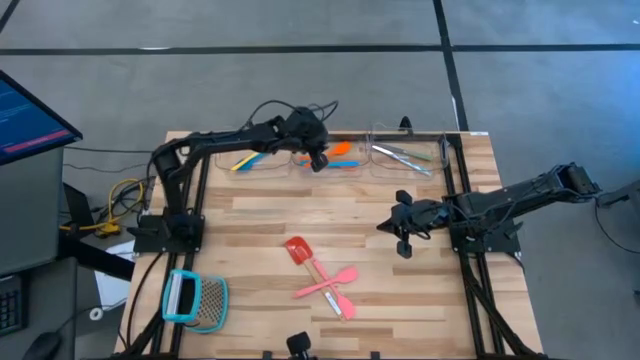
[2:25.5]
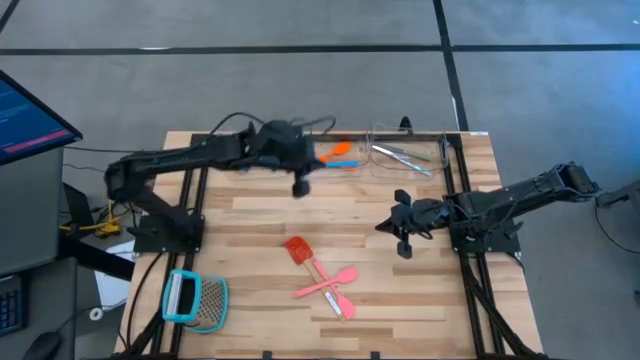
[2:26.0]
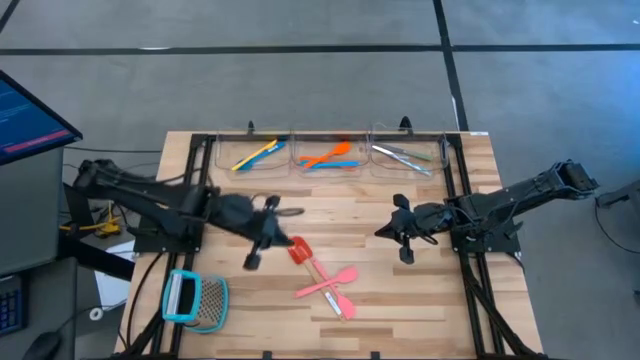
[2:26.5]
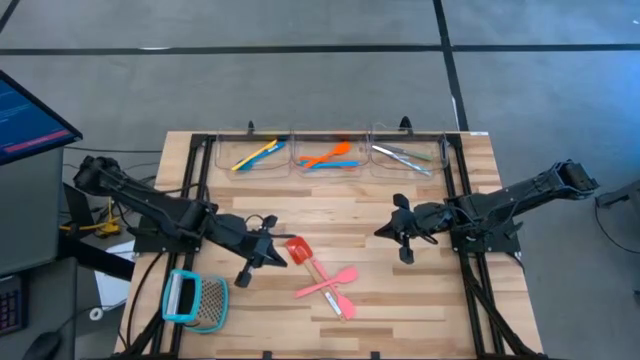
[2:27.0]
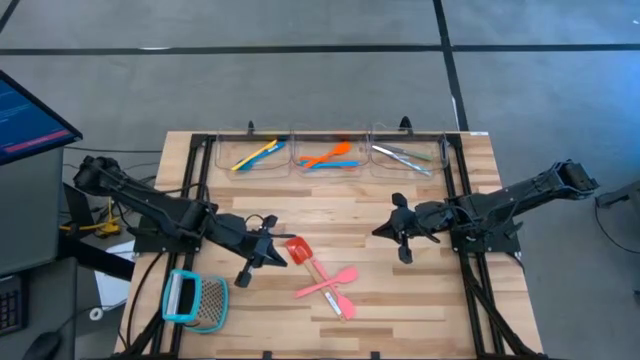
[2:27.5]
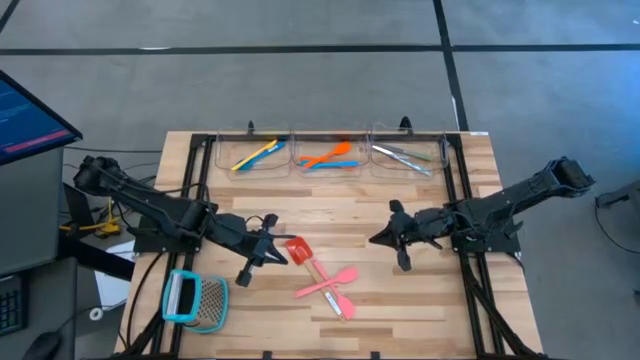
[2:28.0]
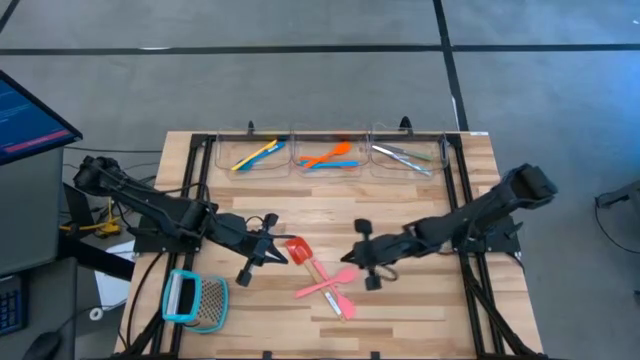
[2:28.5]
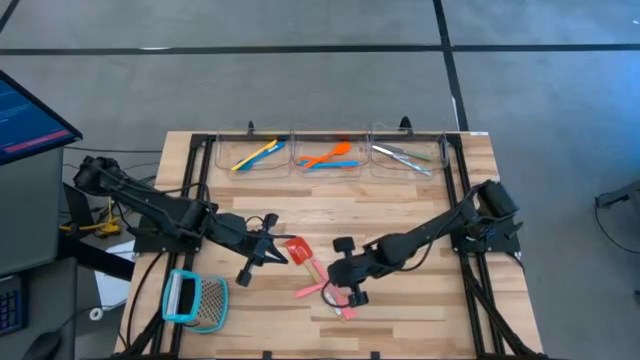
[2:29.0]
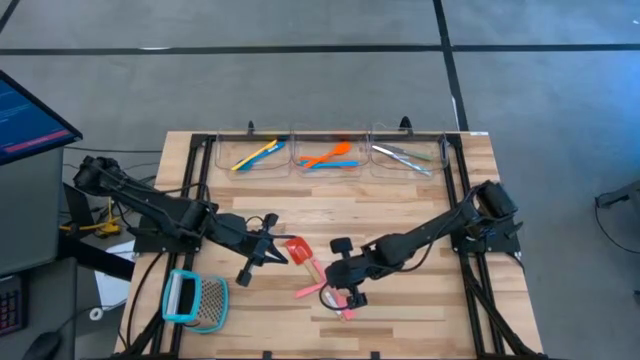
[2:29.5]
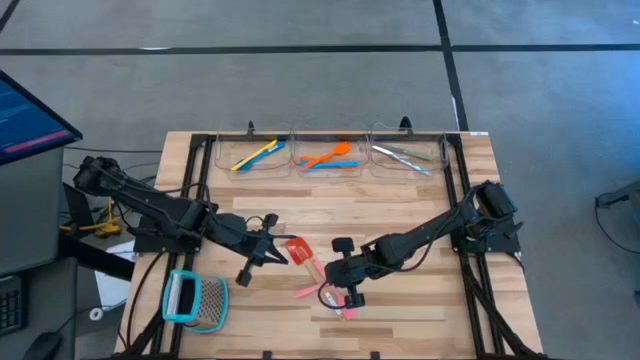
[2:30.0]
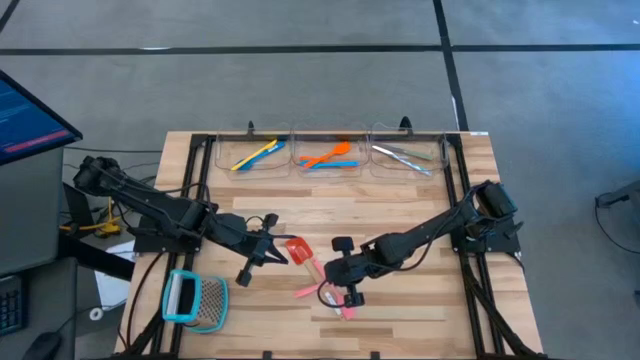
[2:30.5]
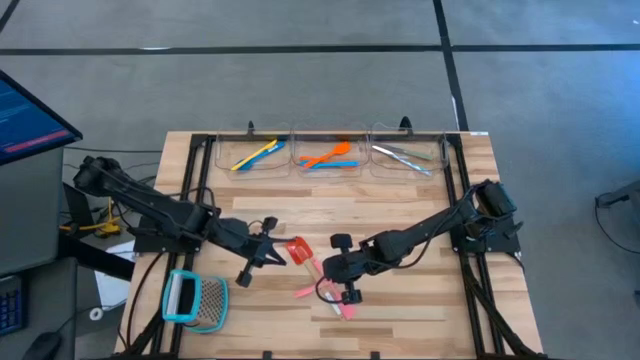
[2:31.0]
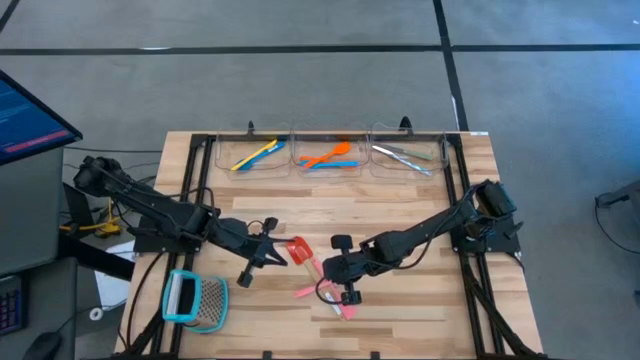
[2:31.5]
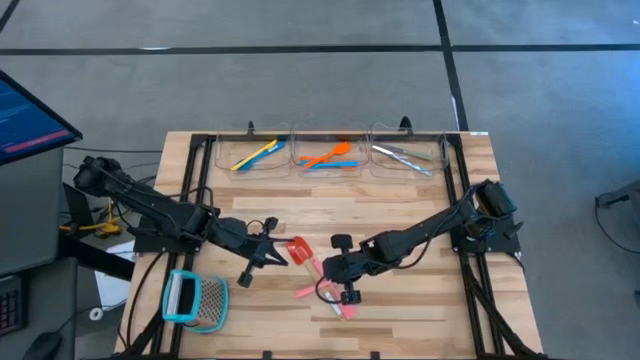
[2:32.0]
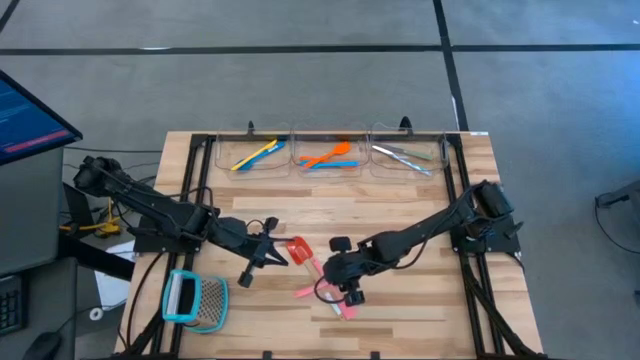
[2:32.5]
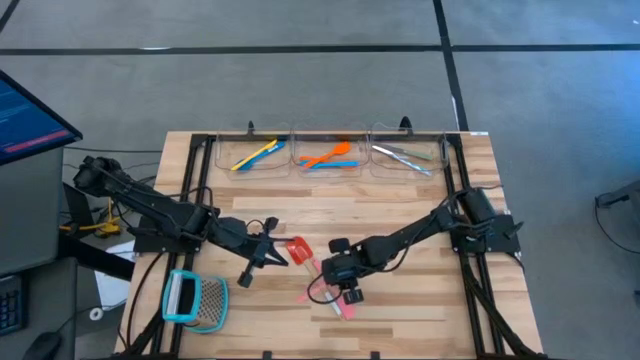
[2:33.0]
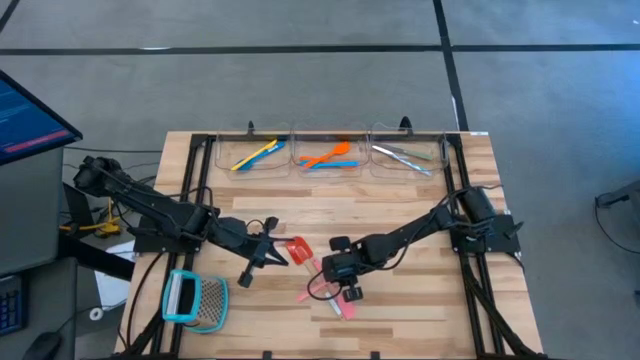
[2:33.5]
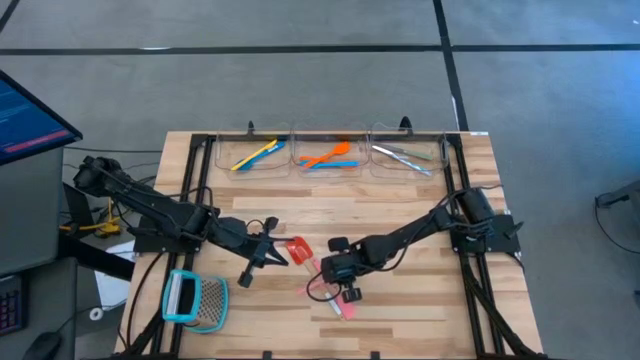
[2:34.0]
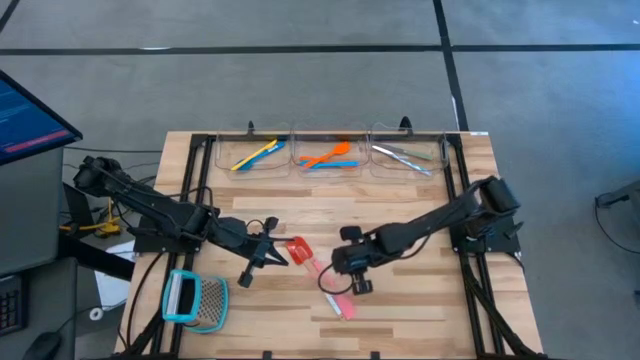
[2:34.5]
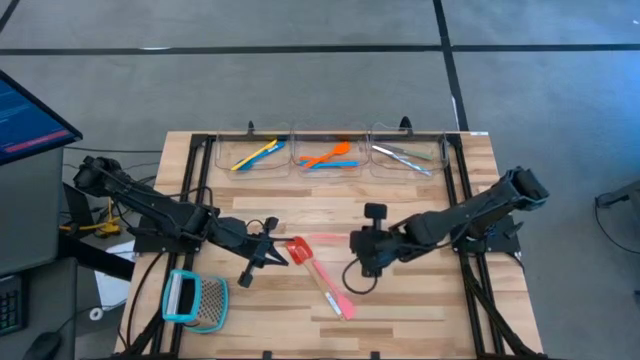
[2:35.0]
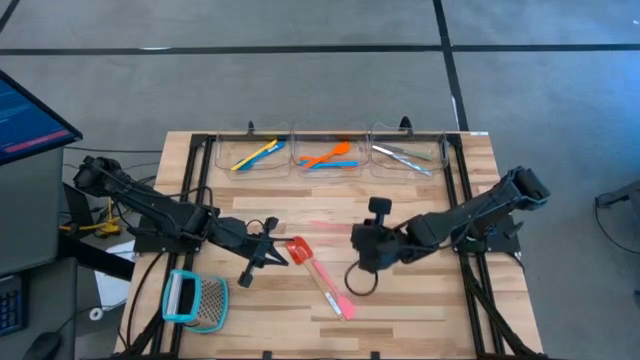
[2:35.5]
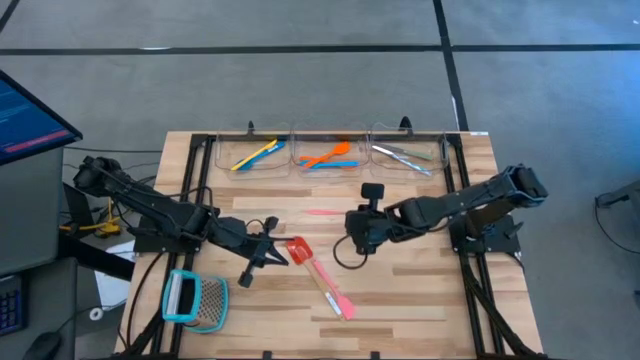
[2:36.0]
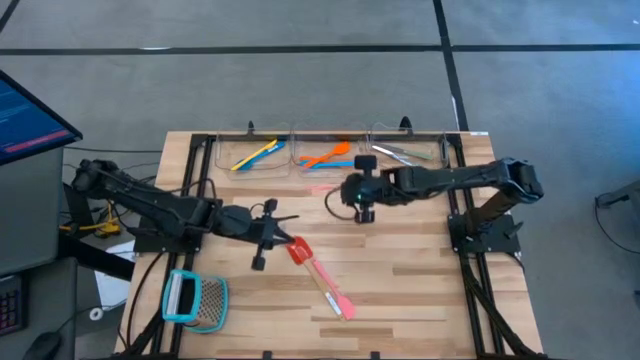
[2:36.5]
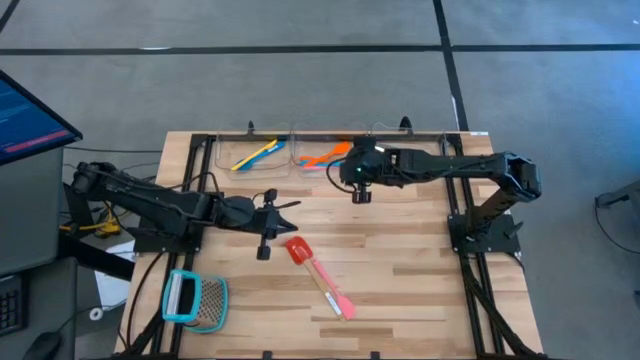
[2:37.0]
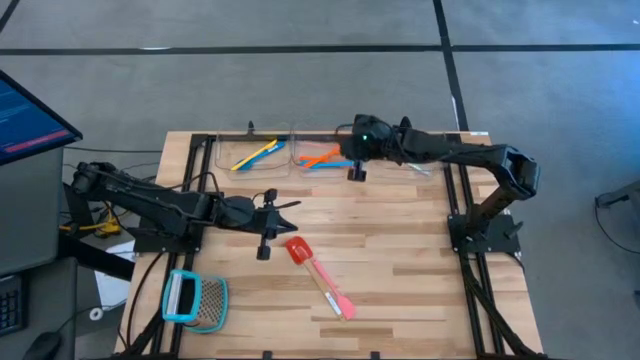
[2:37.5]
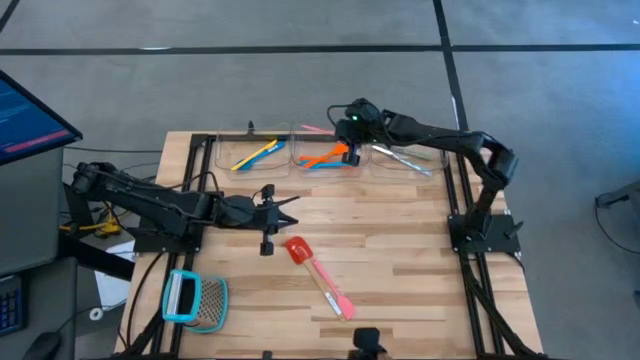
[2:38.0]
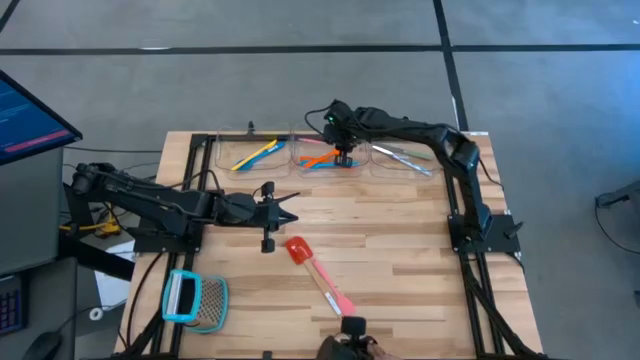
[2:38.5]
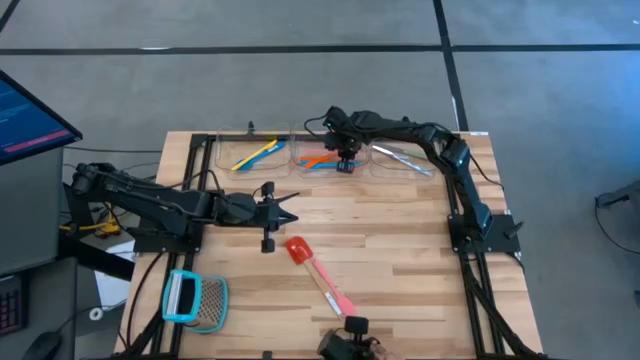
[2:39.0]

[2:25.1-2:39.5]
Task: Pick & Place Kitchen Items
Put the pink spatula into the middle transparent bin

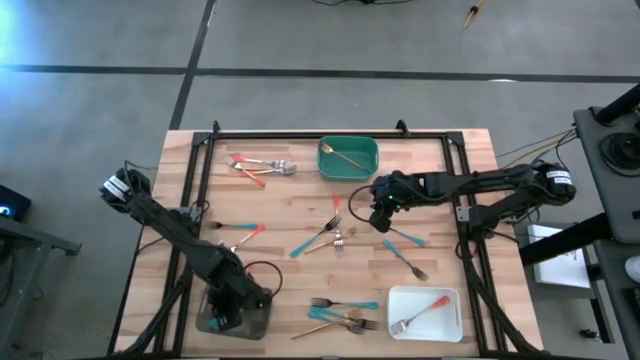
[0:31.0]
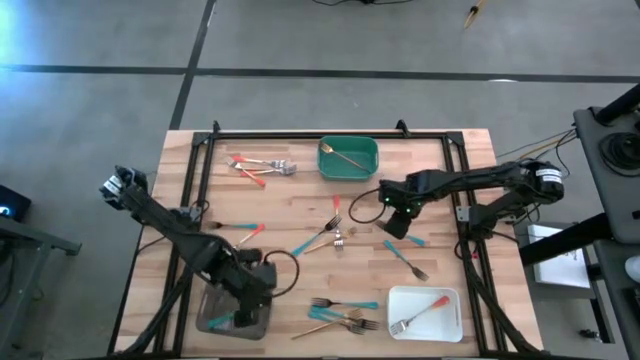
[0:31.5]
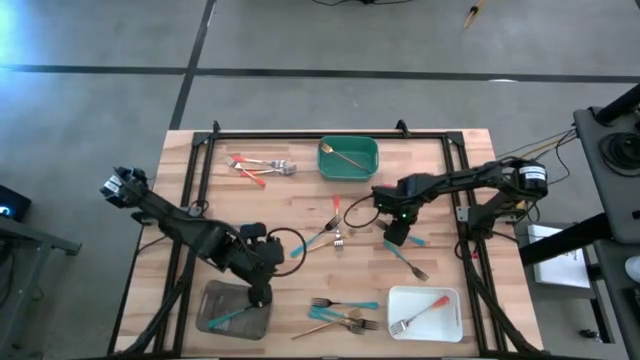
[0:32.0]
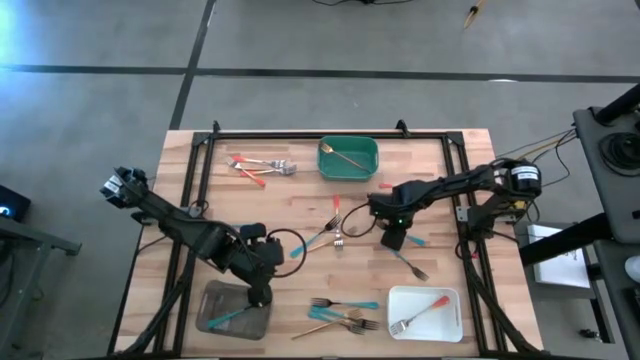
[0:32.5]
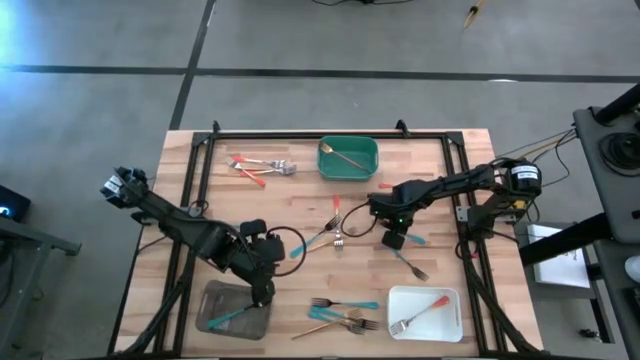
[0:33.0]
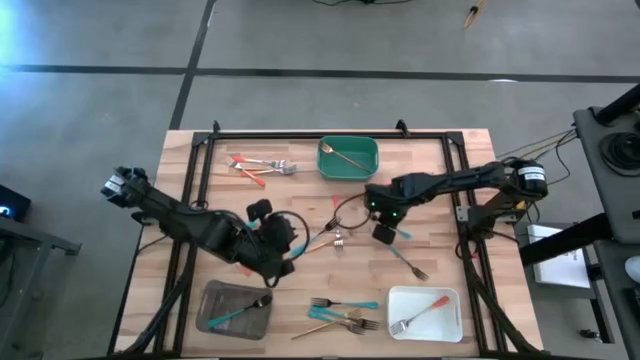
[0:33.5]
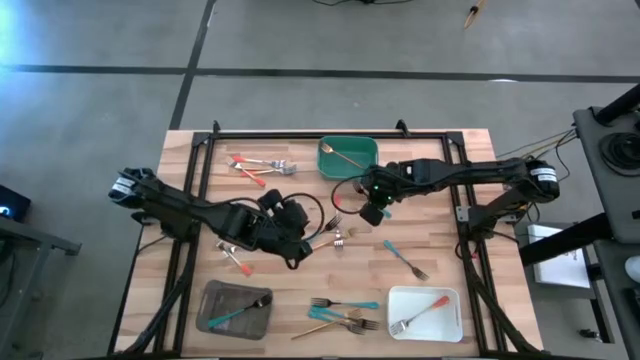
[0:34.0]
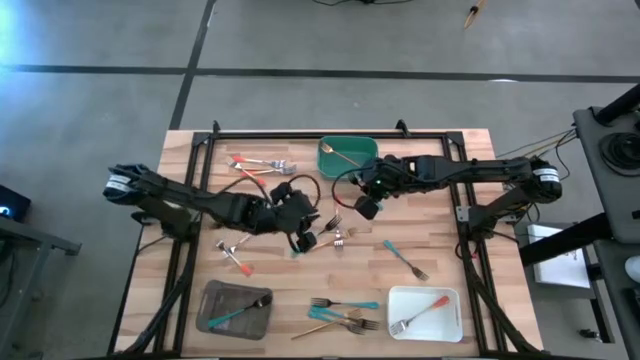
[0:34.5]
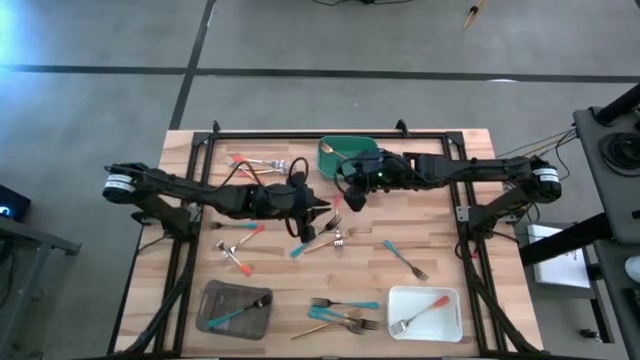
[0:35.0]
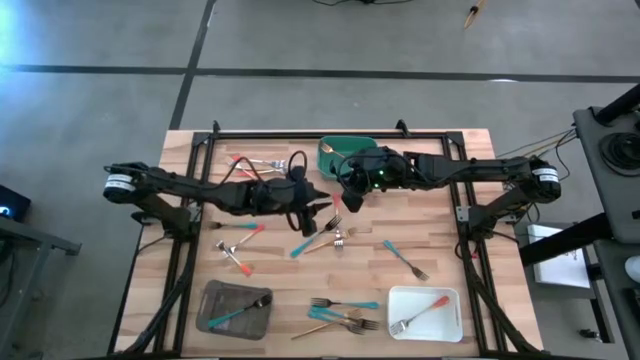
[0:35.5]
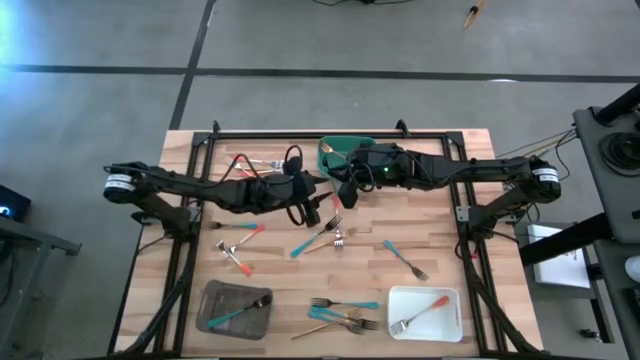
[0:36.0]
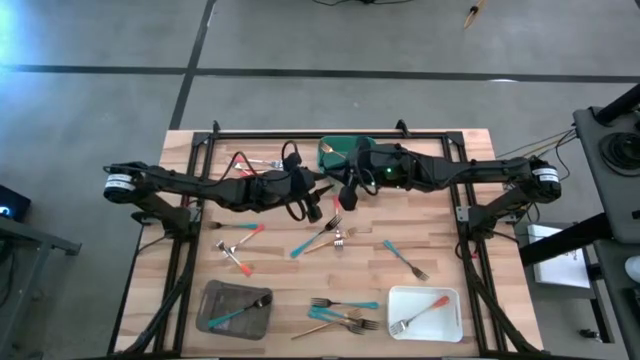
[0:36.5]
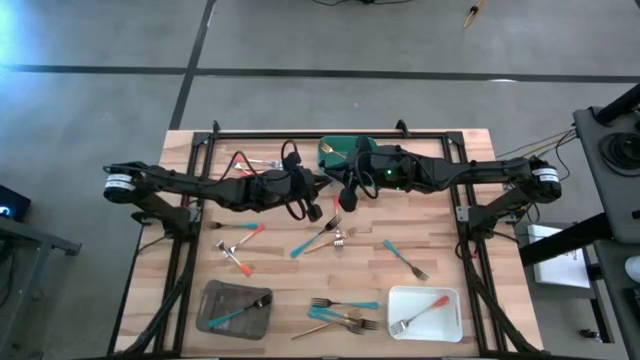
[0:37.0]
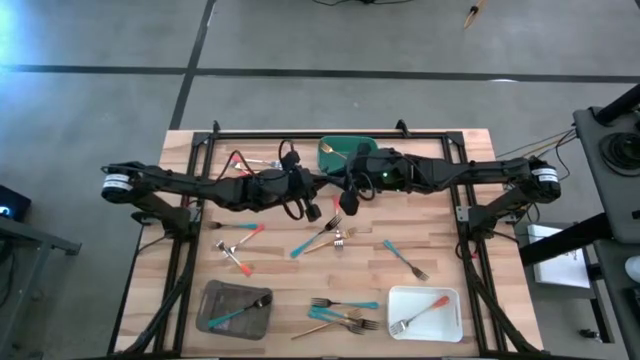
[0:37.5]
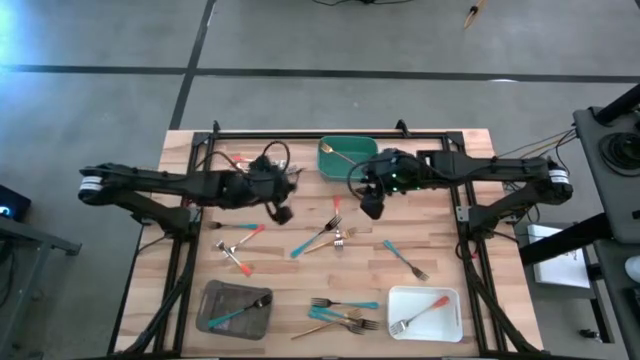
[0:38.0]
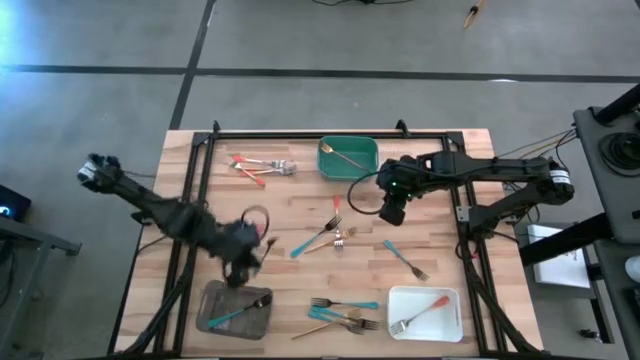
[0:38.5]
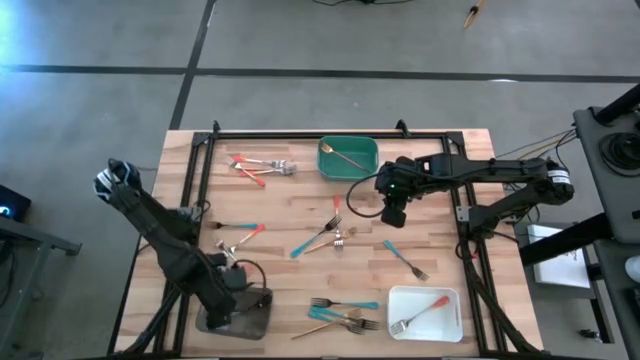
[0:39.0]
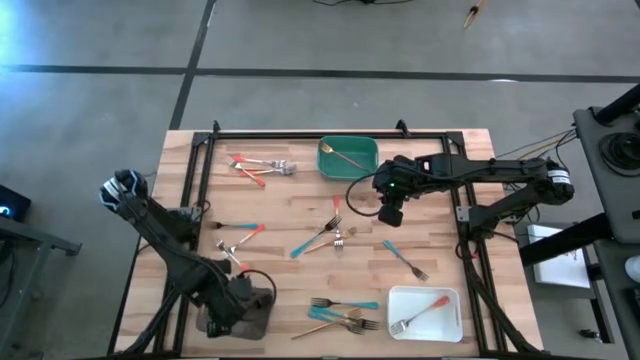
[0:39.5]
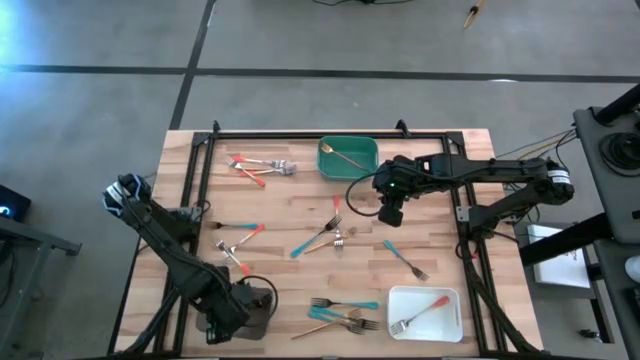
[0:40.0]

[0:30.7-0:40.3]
Task: Sort silverware by color (type)
Put the blue fork into the black bin
